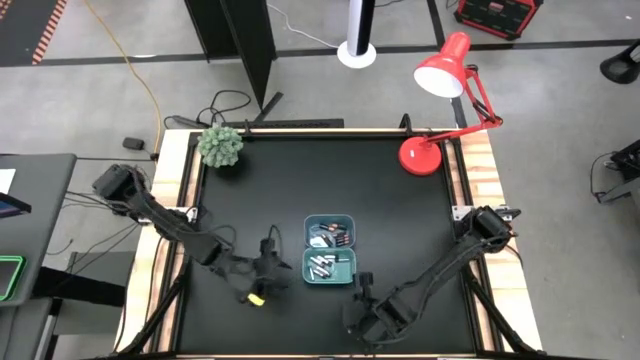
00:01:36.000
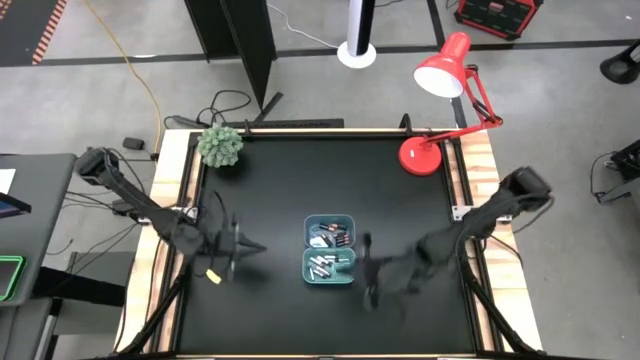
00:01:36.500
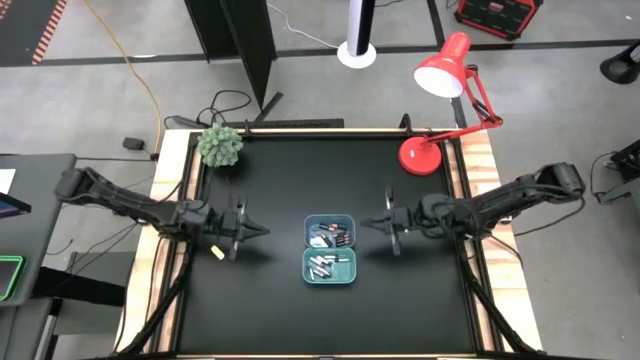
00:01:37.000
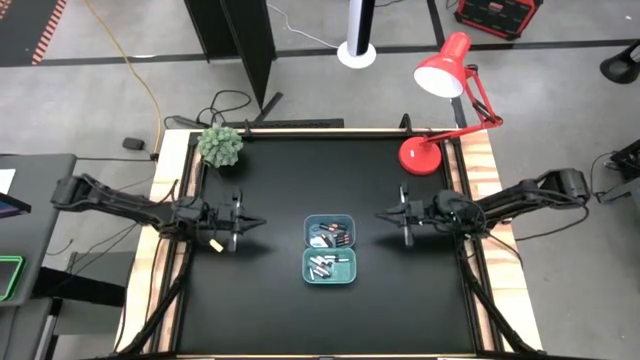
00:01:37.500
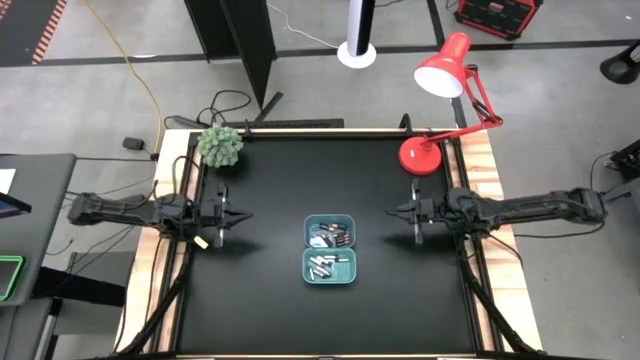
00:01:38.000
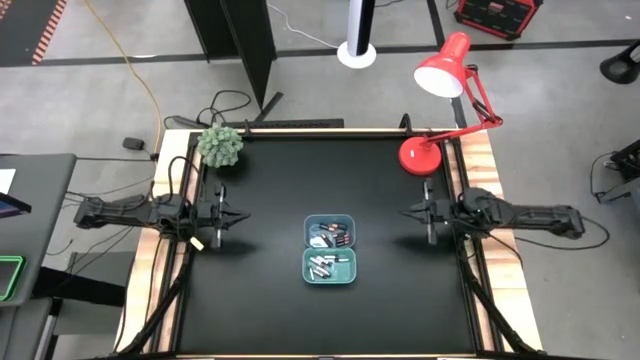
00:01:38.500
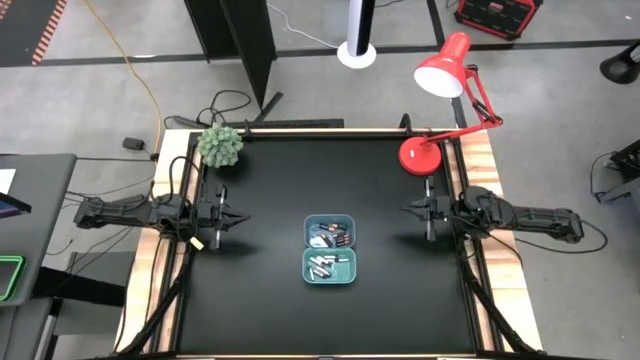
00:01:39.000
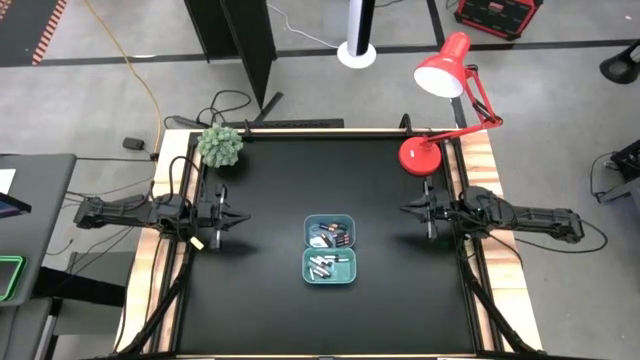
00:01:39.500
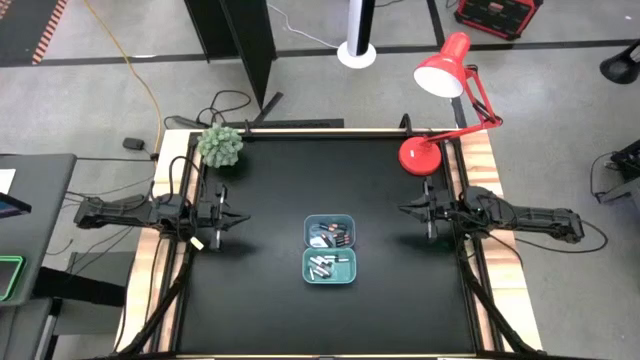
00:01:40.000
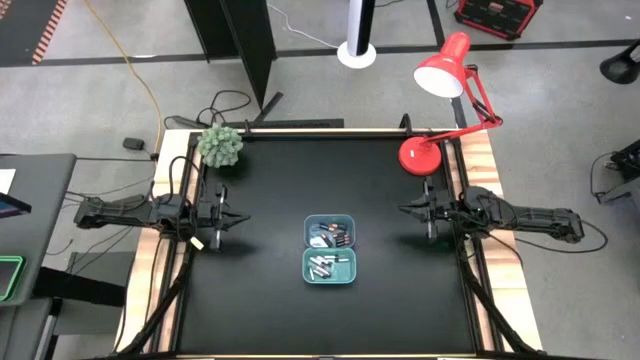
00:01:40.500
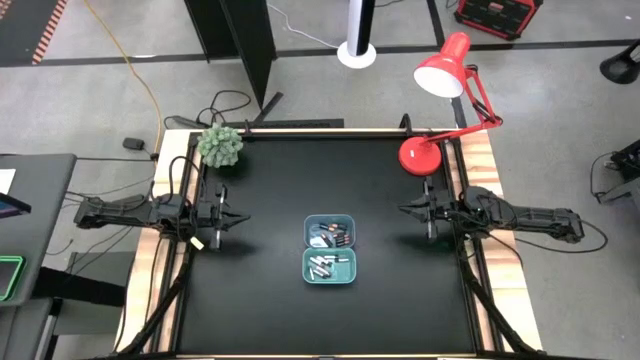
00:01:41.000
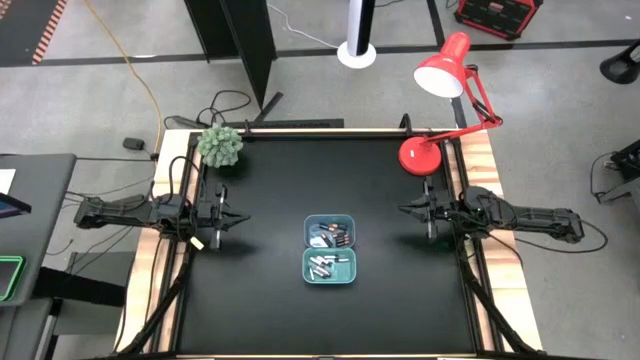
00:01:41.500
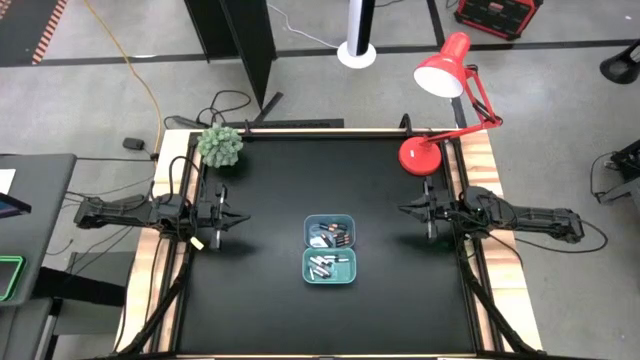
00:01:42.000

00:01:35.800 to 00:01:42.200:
Task: Sort batteries
Return to Home Position

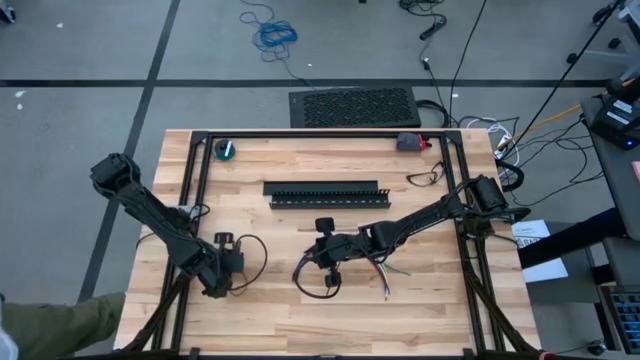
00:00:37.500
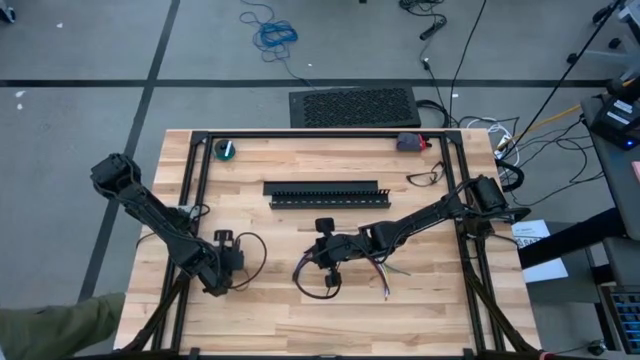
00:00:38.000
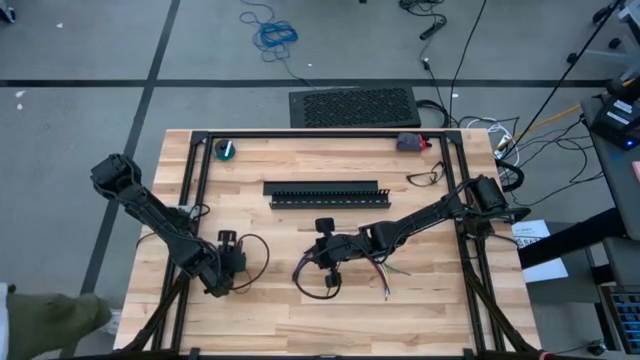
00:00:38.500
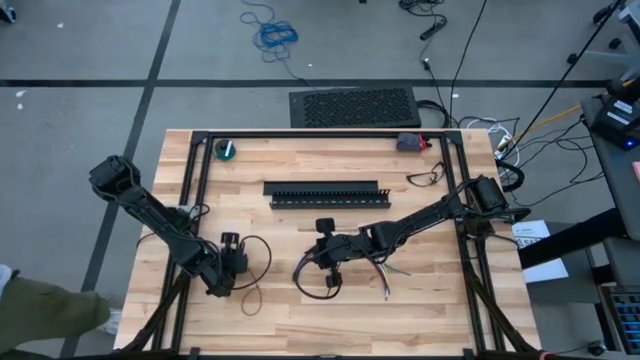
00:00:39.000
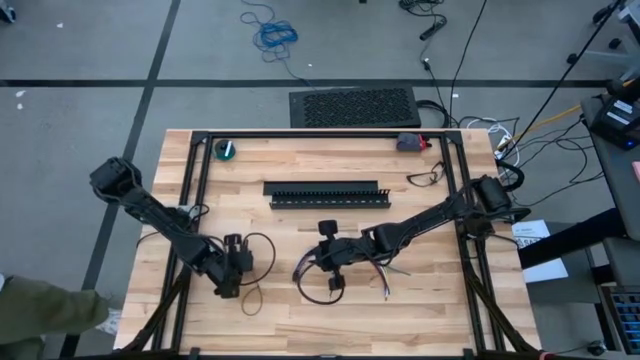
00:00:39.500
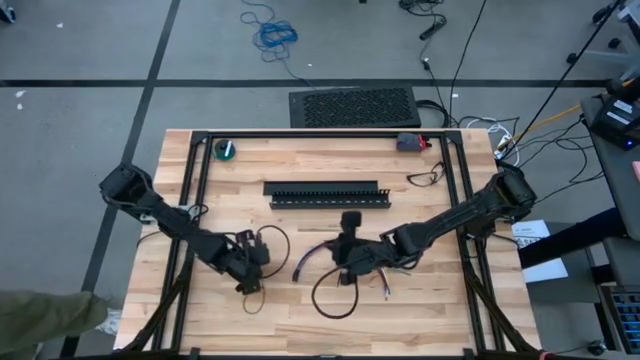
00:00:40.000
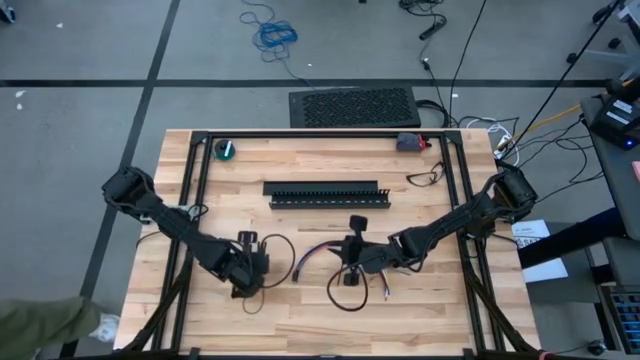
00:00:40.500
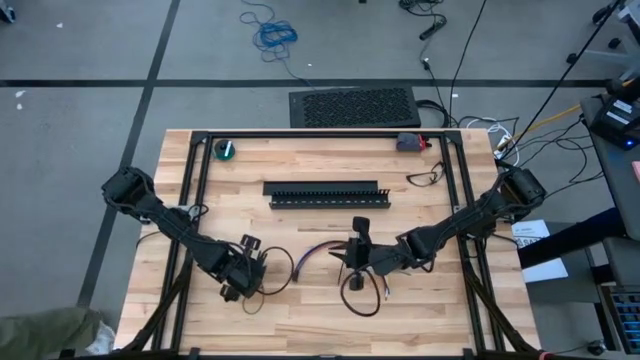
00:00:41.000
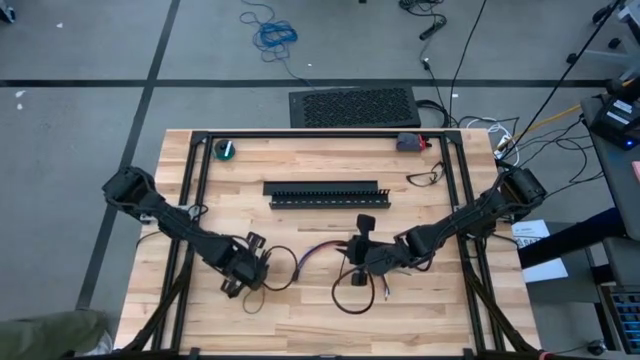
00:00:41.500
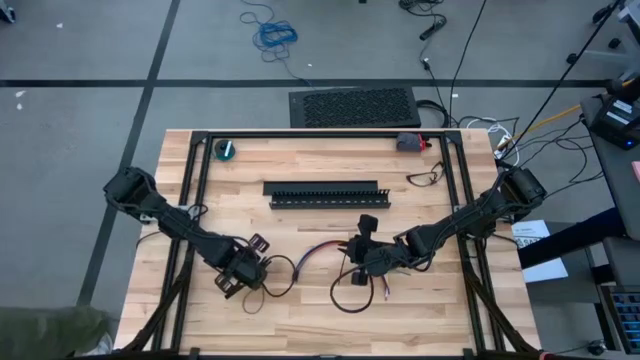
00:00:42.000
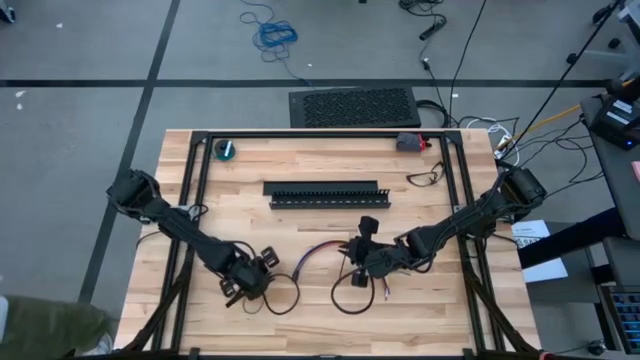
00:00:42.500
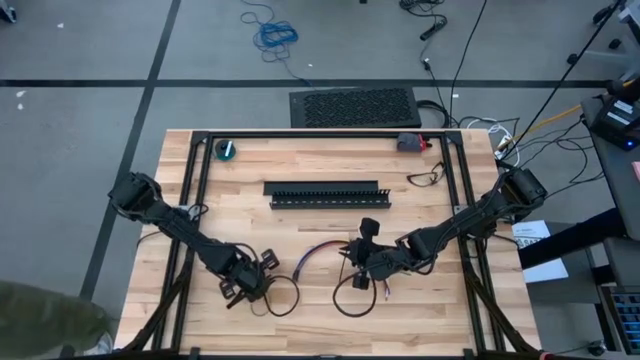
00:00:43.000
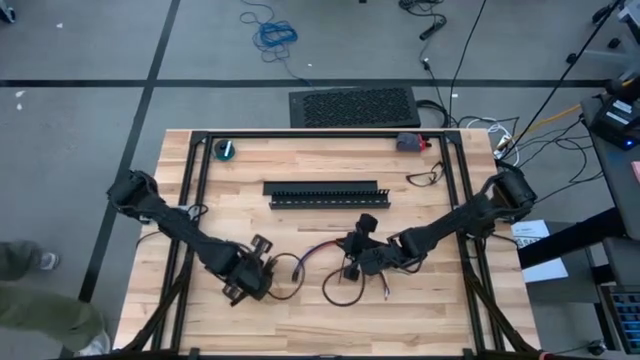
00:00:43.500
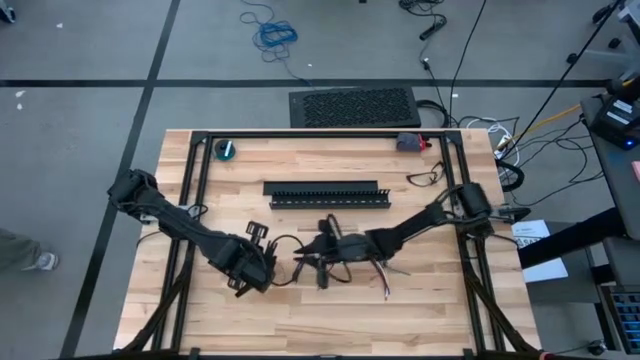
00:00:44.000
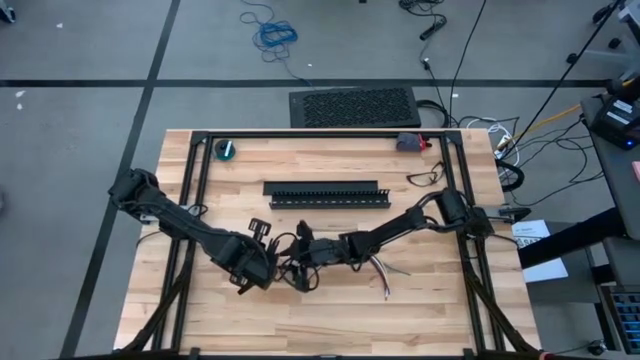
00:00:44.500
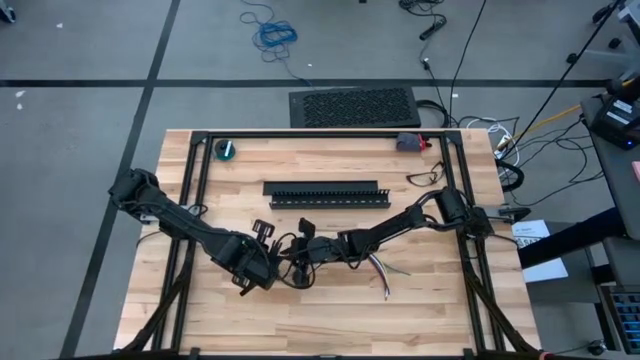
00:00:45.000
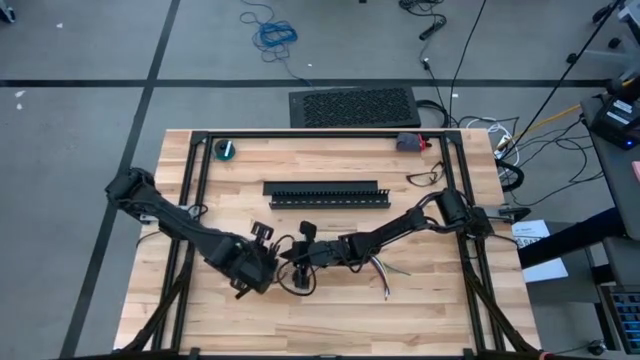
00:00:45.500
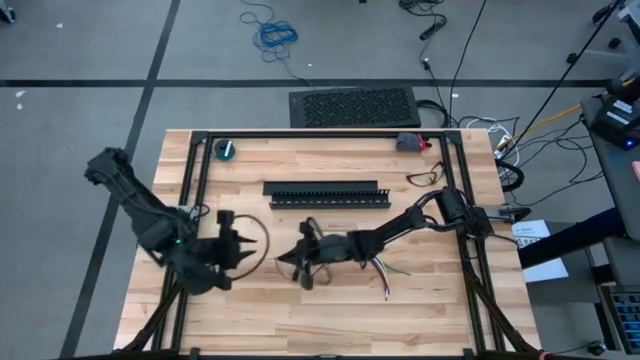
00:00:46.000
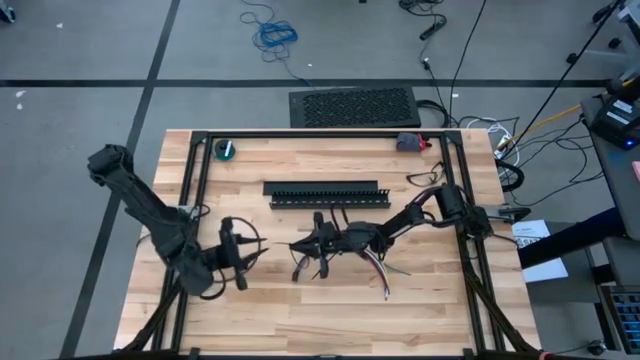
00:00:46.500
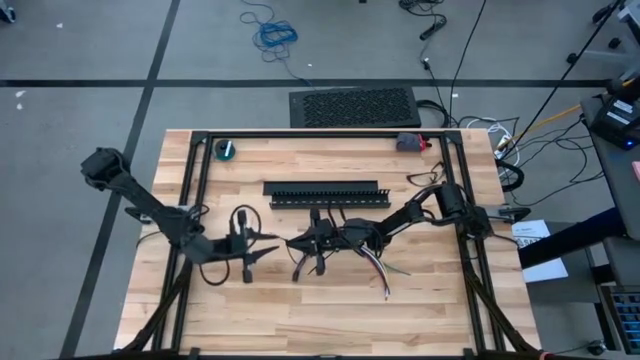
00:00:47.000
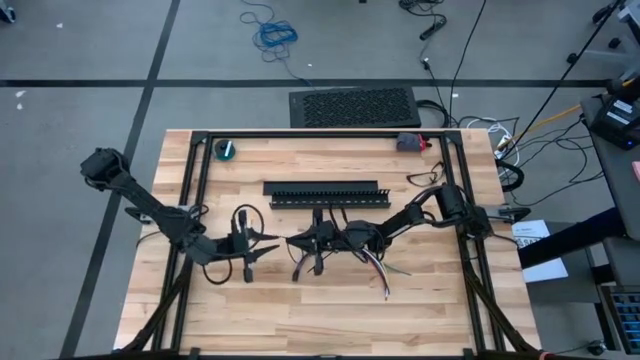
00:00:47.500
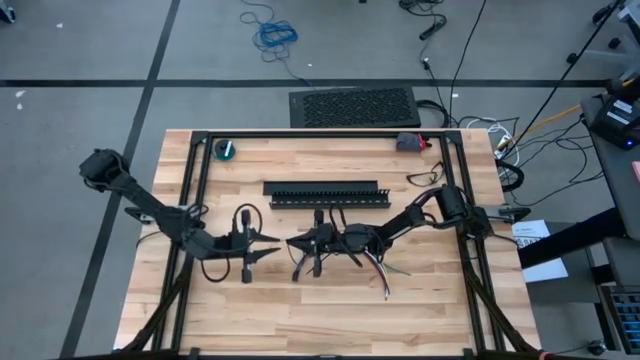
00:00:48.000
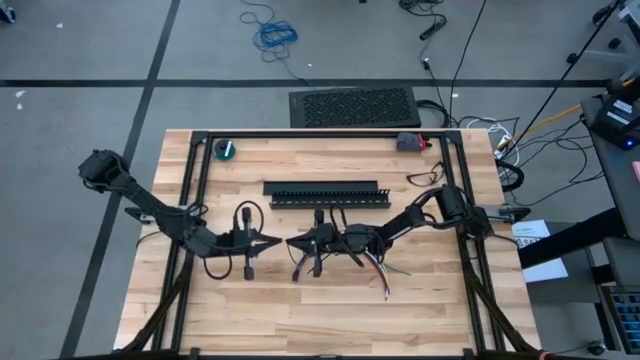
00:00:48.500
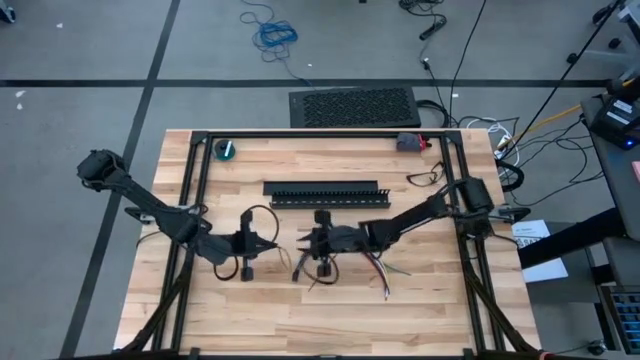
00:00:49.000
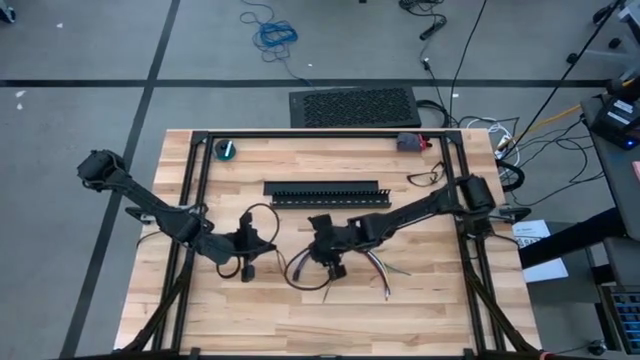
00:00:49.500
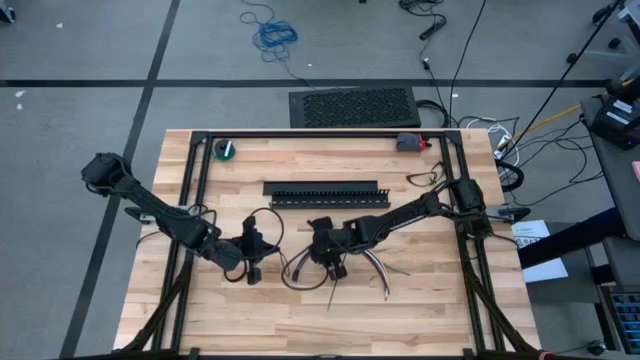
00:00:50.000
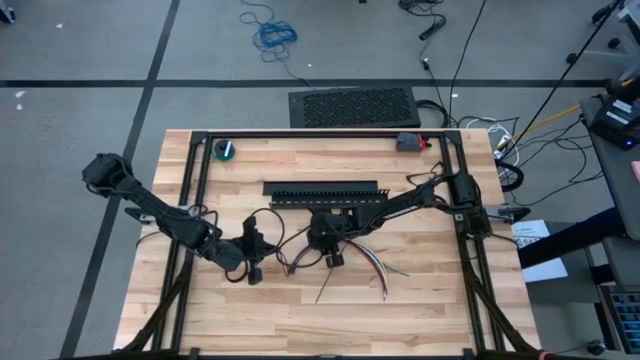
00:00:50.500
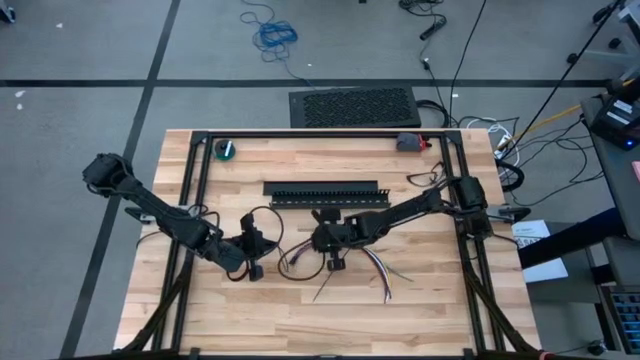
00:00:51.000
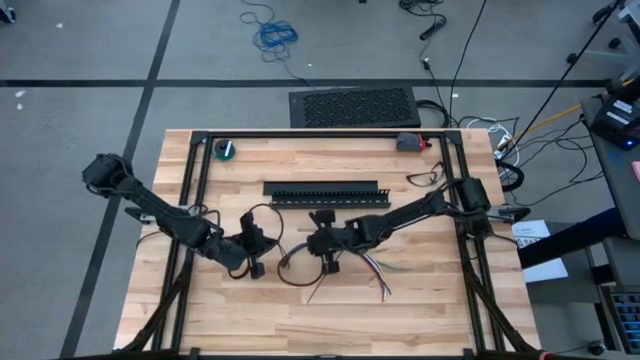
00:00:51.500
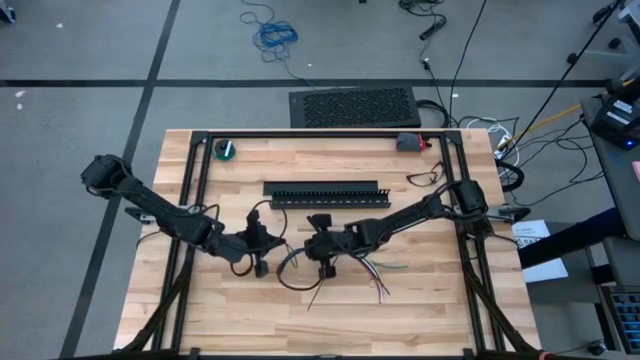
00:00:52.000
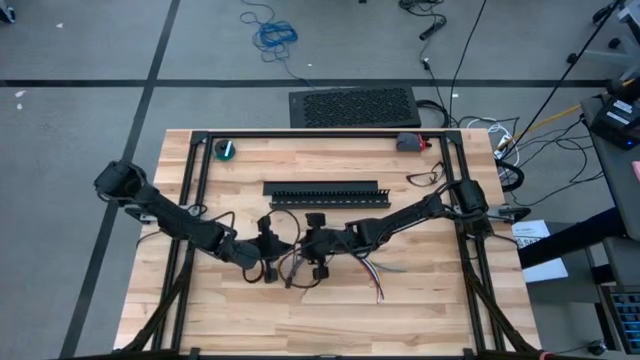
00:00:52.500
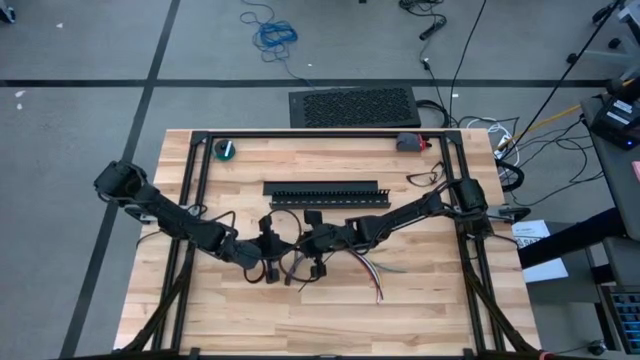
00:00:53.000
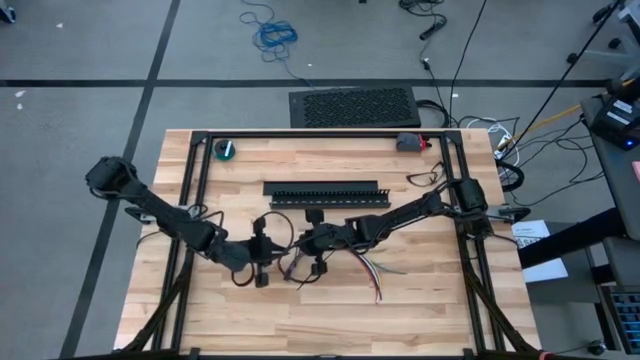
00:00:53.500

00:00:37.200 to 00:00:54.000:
Task: Ziptie cables
Wrap the cables together using a zip tie
